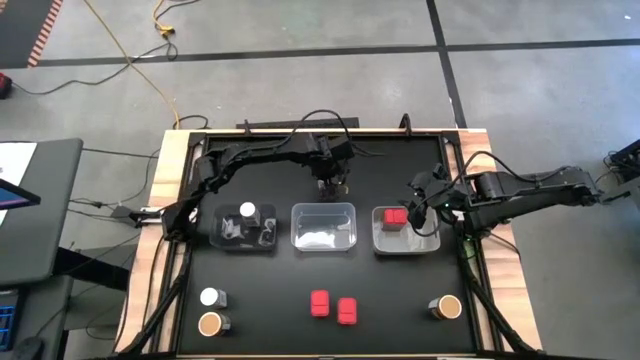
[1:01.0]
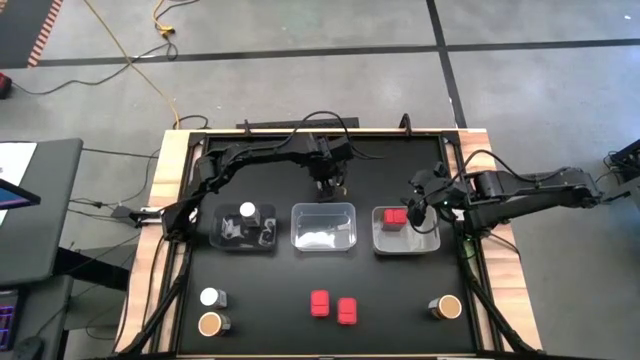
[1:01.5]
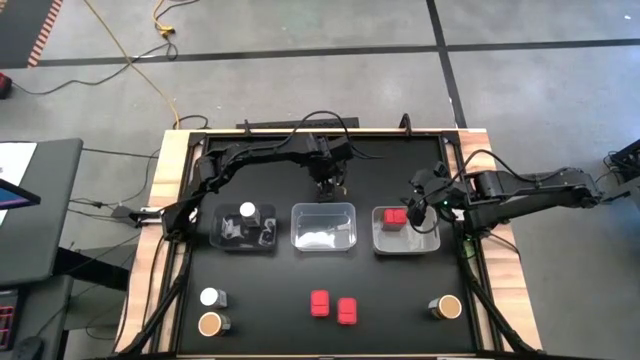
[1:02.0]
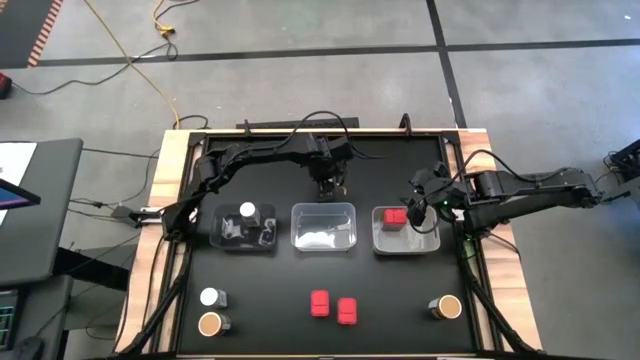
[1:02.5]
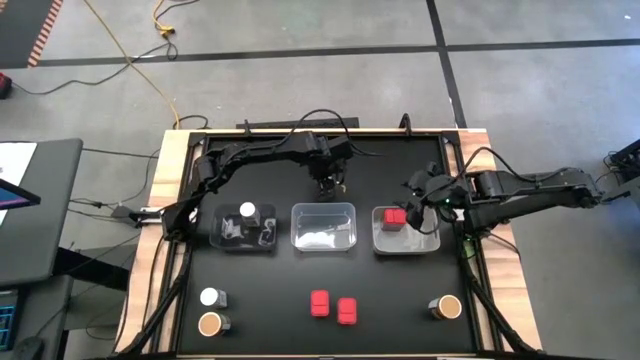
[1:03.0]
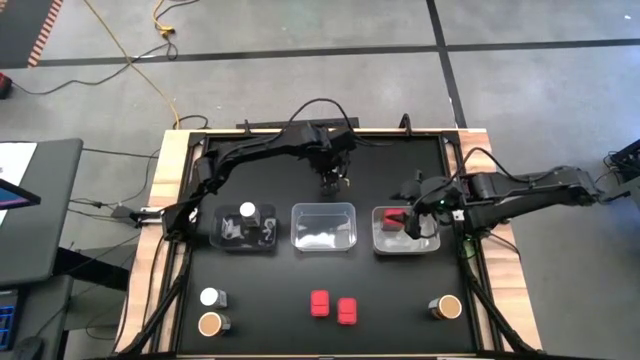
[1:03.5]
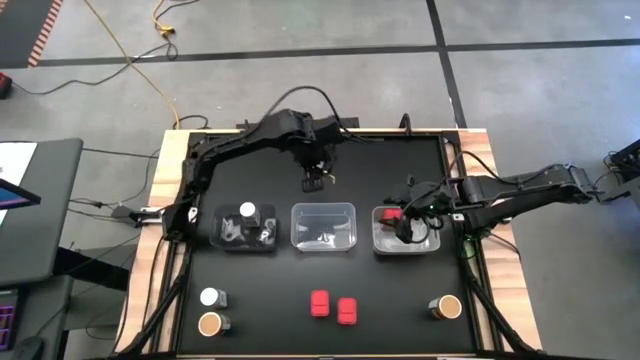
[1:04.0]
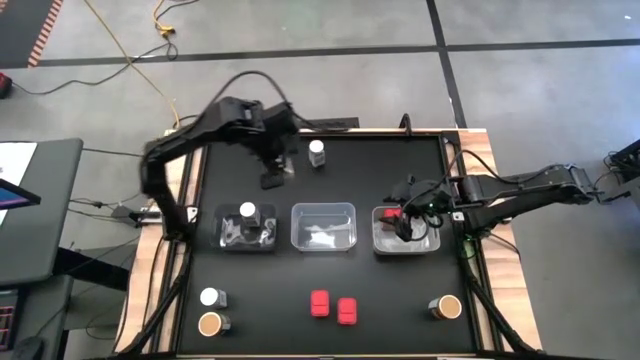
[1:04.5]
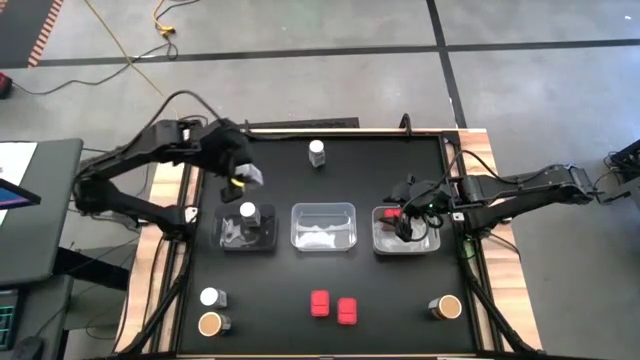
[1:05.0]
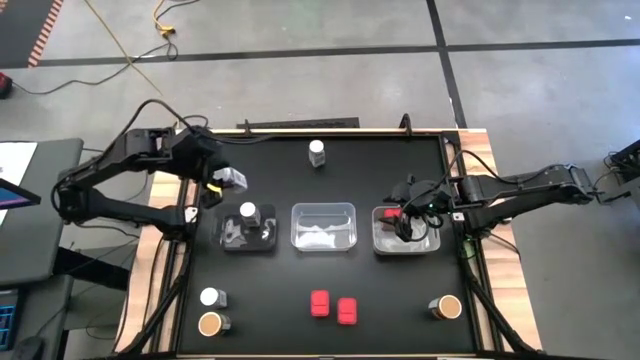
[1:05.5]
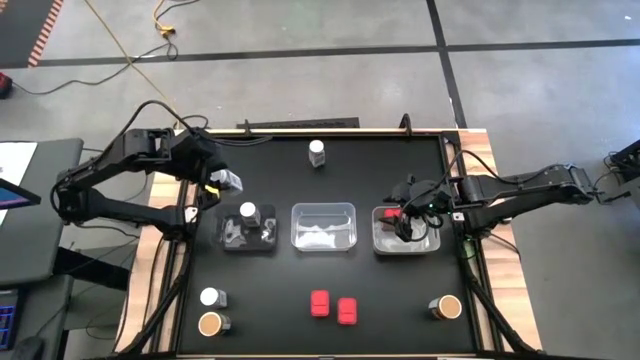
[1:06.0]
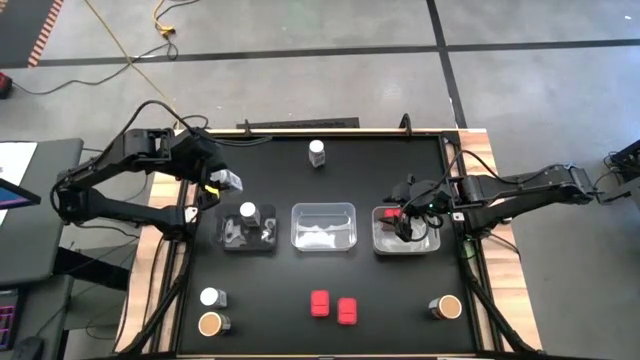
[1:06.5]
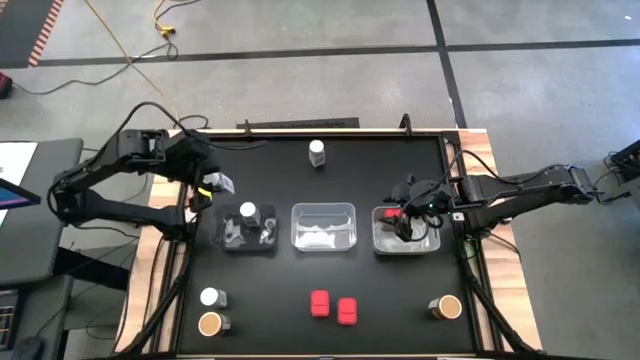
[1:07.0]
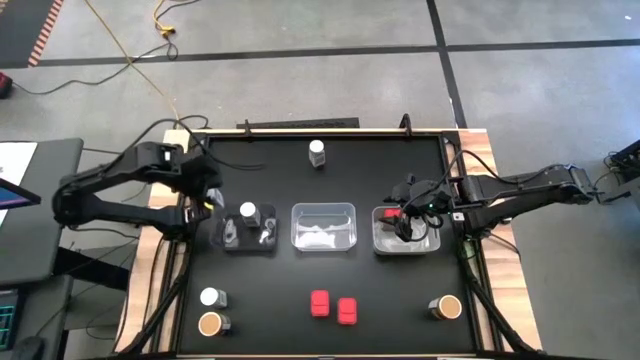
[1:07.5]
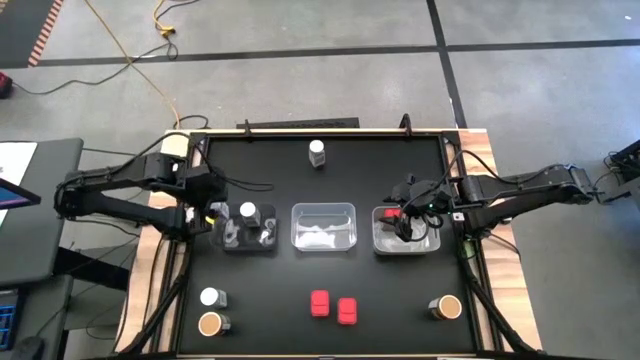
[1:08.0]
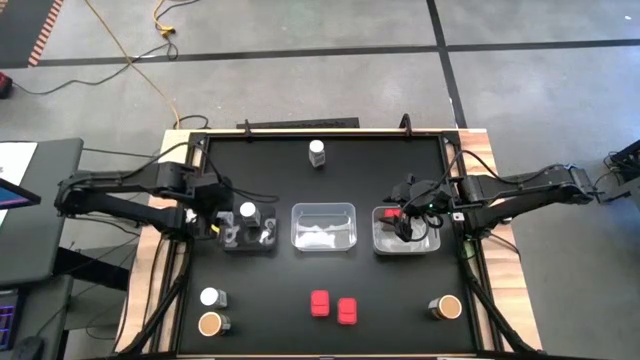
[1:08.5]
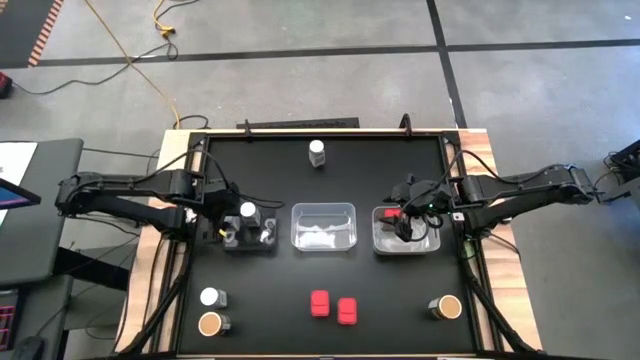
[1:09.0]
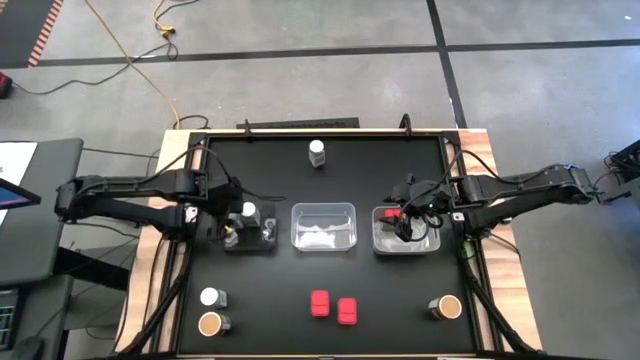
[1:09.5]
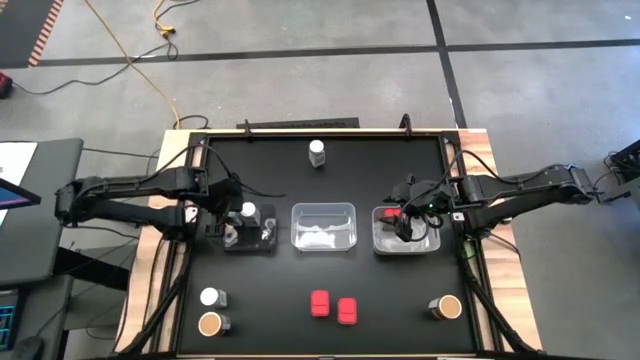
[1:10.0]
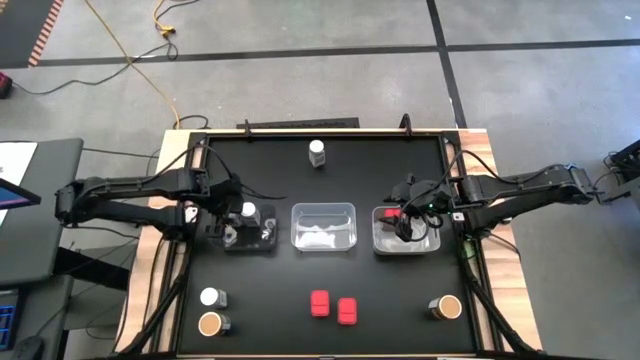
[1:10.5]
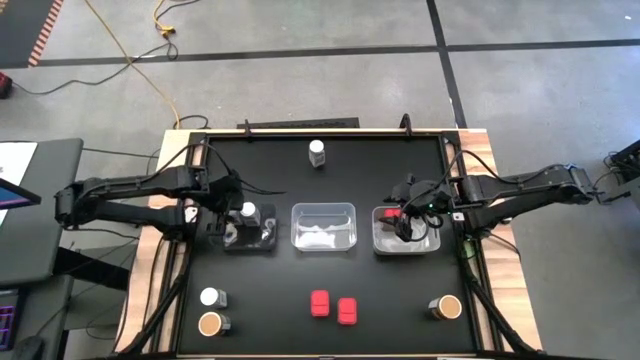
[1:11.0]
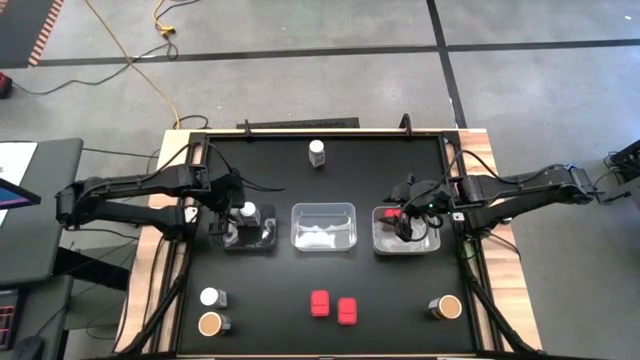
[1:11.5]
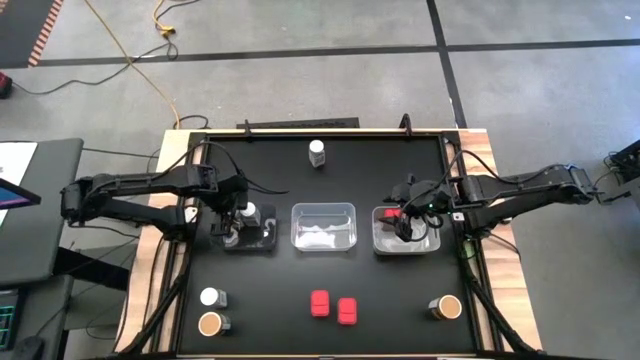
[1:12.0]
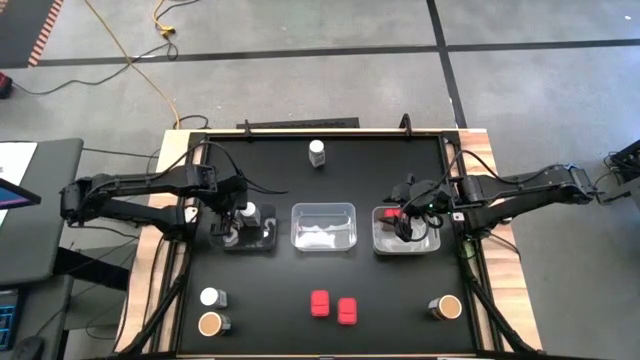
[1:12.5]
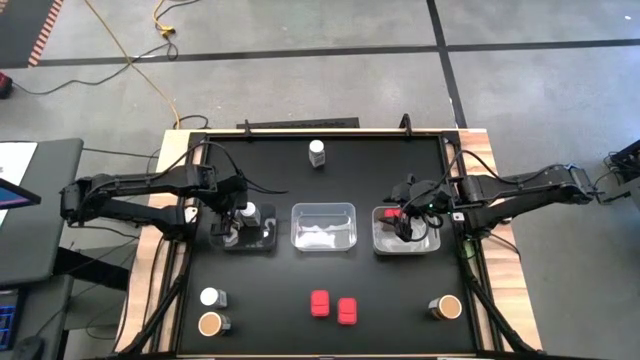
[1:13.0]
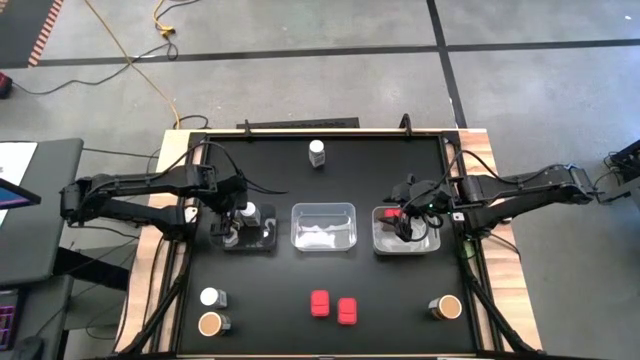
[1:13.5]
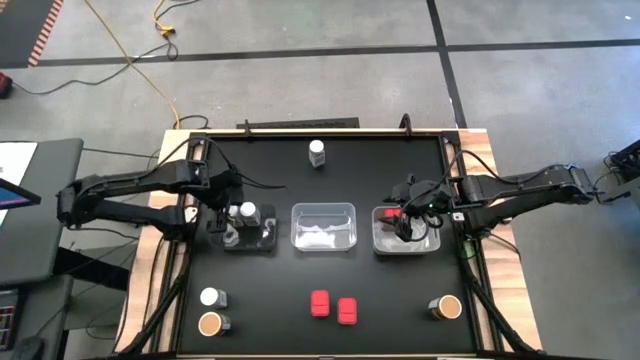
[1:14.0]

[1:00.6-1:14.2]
Task: Sort spices by type
Put the top right white seasoning bottle into the black bin

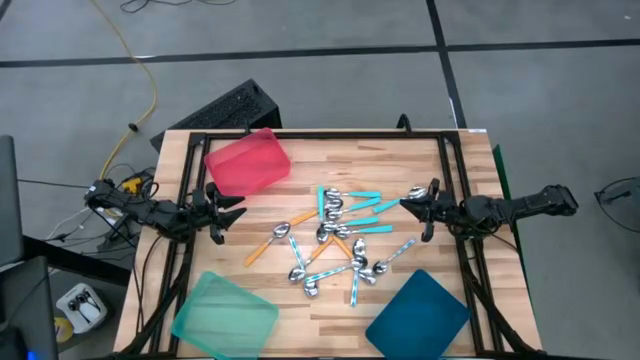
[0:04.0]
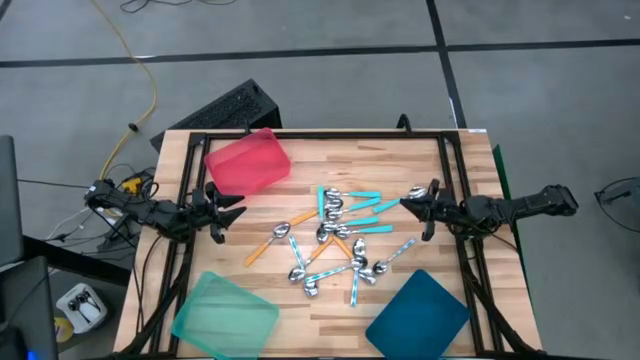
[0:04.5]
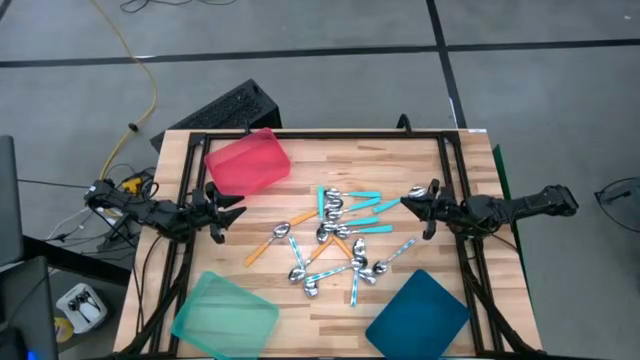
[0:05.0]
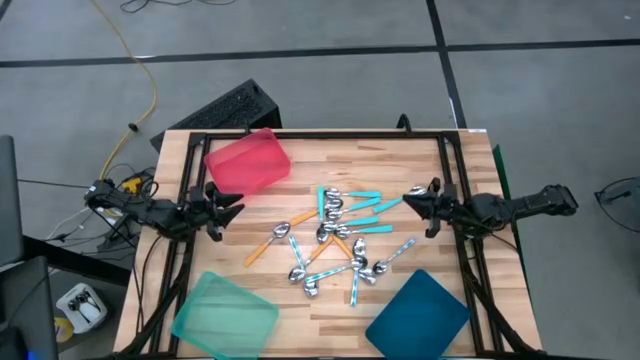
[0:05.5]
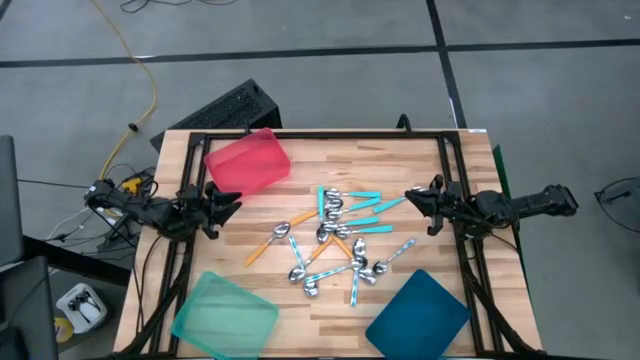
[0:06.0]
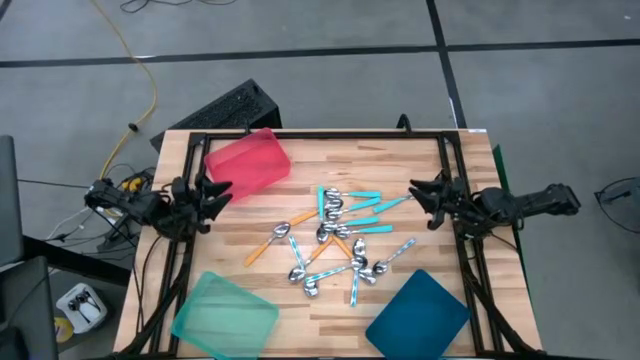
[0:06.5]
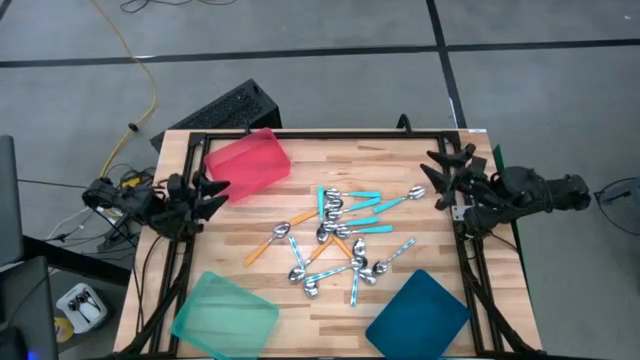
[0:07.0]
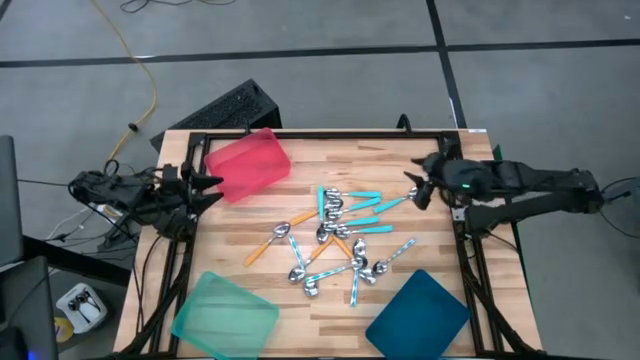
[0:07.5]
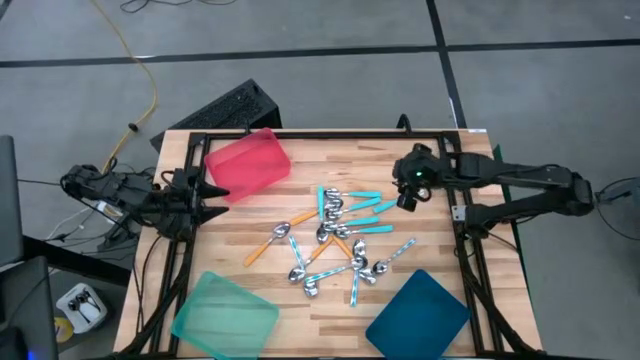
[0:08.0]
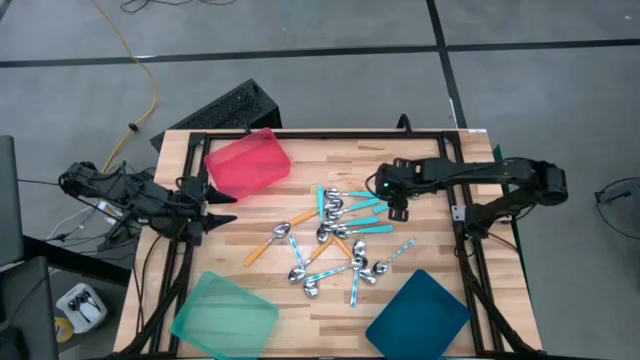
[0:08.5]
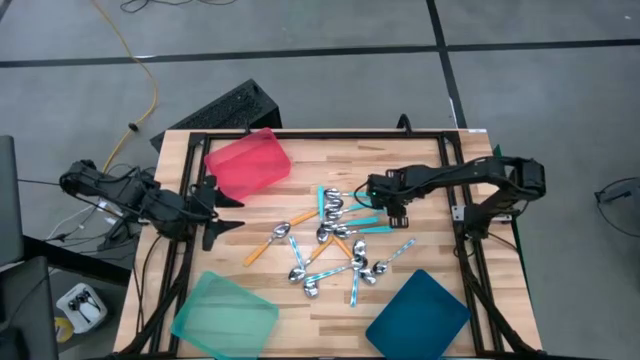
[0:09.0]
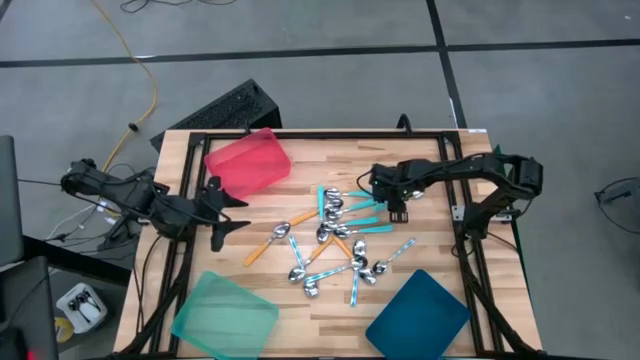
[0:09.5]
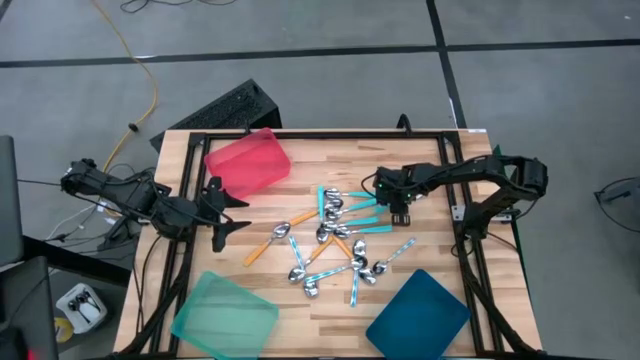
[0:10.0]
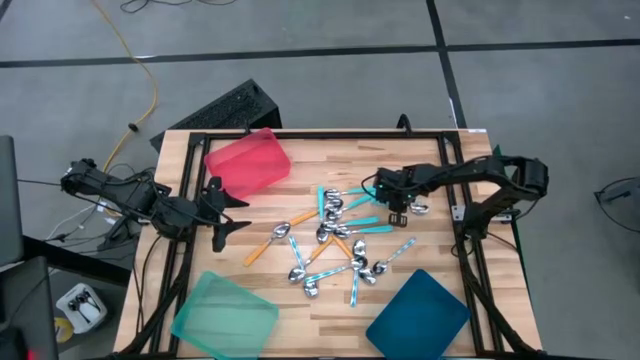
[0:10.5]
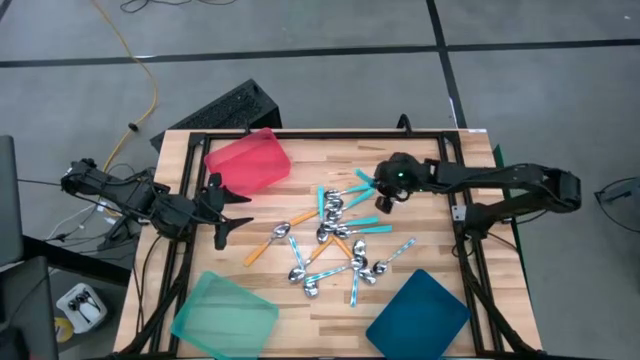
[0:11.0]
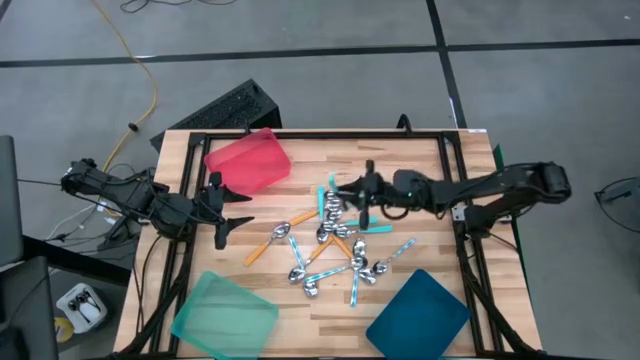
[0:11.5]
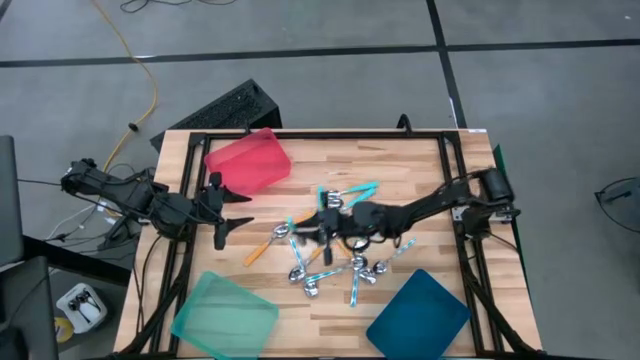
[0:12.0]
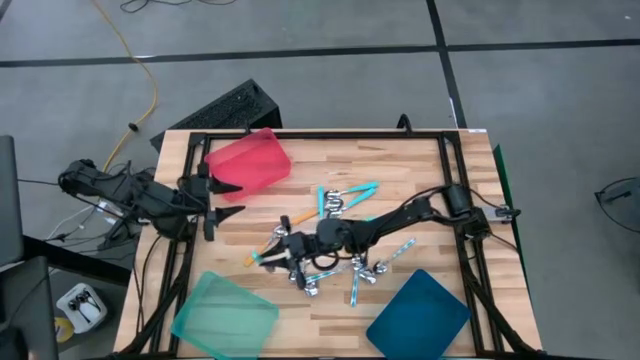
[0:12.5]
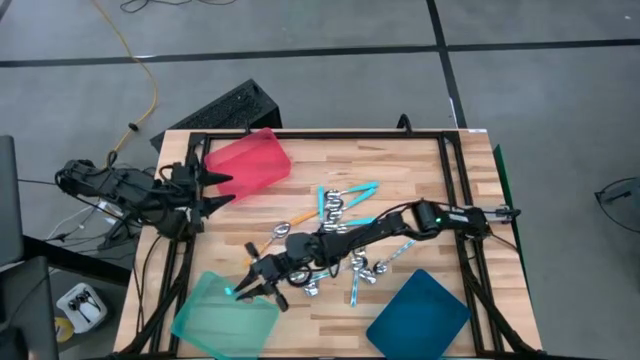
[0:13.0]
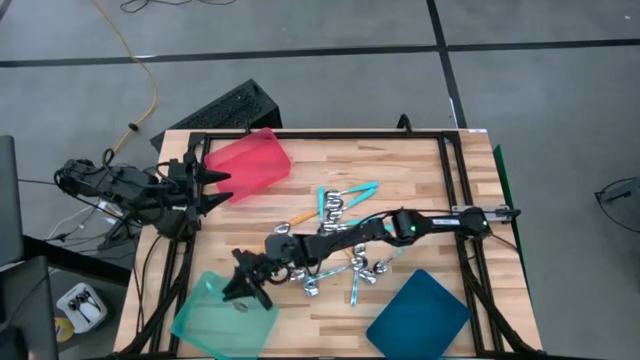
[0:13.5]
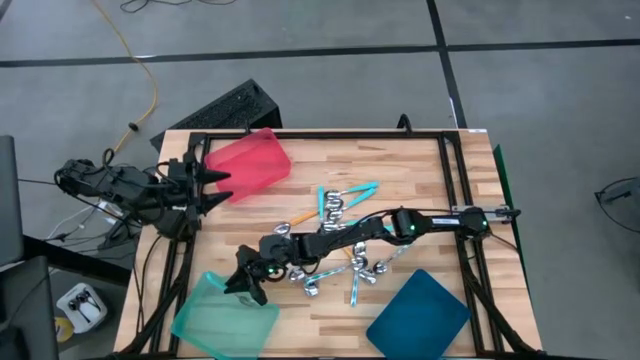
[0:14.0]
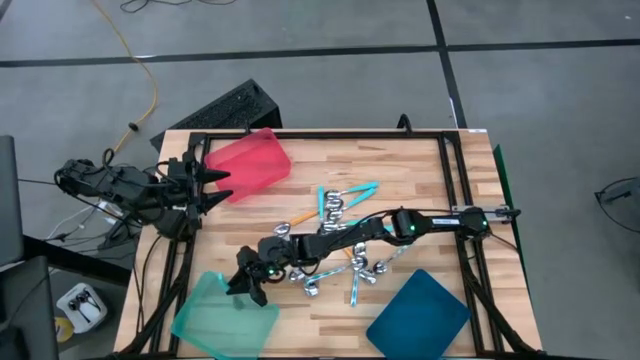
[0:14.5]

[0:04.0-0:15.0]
Task: Sort silverware by color (type)
Put the blue spoon into the light blue bin
